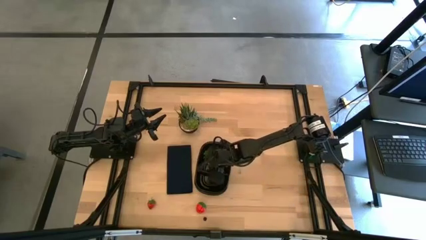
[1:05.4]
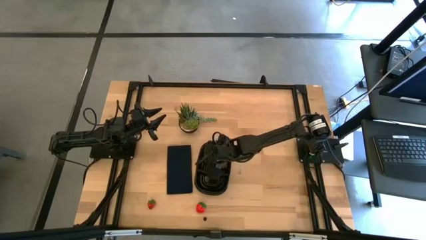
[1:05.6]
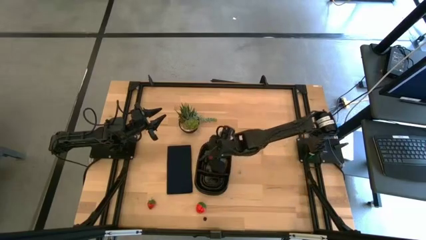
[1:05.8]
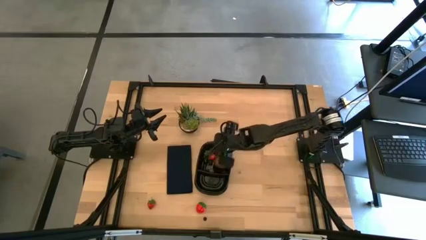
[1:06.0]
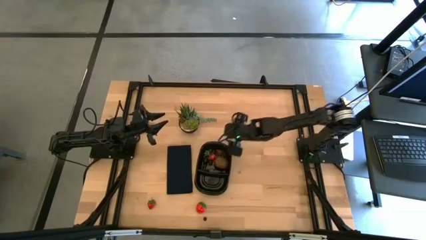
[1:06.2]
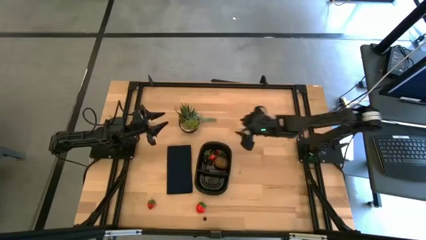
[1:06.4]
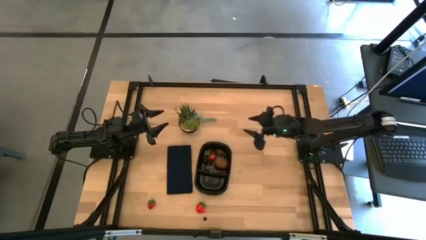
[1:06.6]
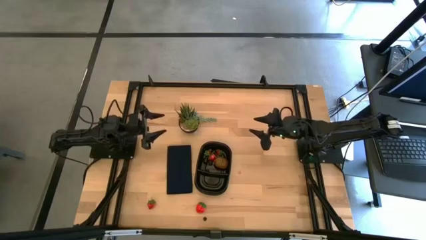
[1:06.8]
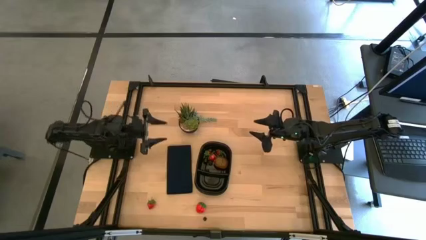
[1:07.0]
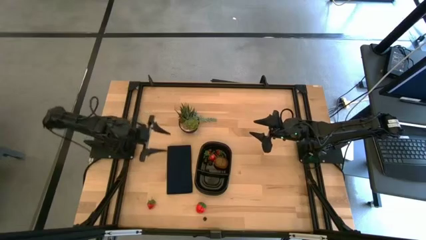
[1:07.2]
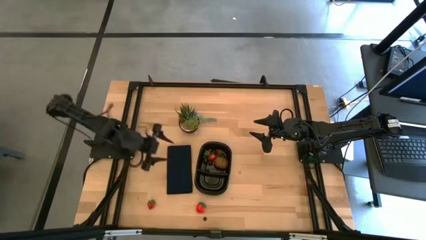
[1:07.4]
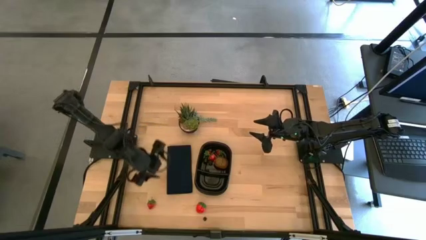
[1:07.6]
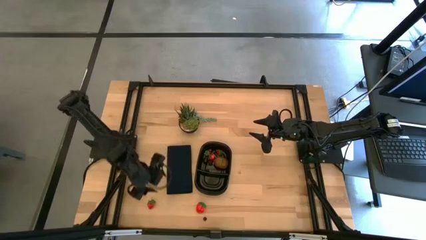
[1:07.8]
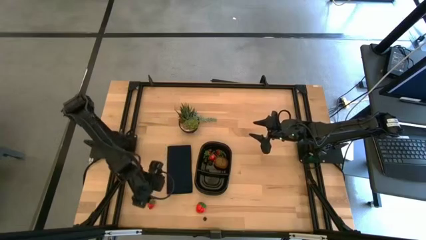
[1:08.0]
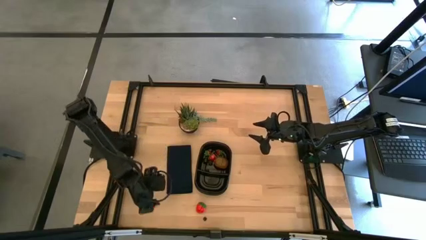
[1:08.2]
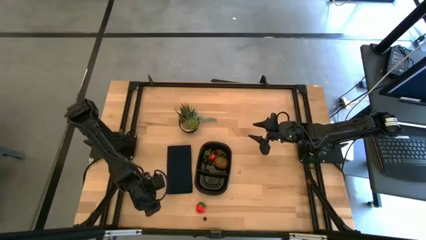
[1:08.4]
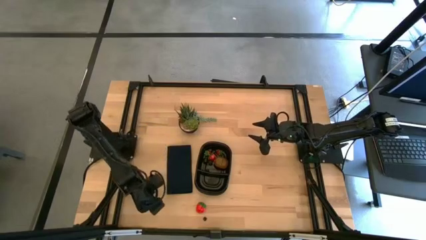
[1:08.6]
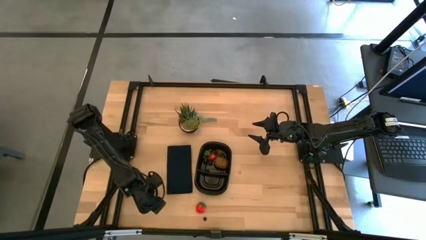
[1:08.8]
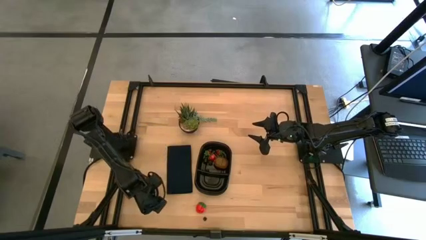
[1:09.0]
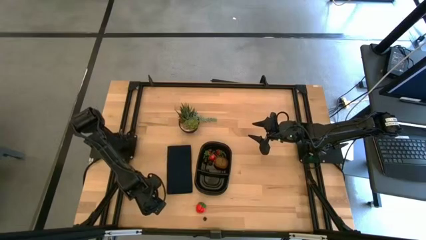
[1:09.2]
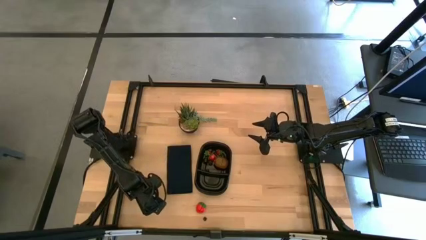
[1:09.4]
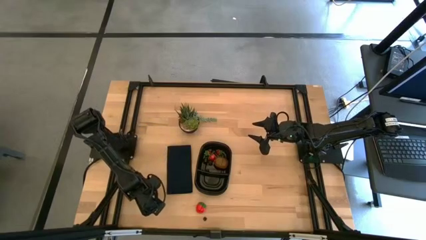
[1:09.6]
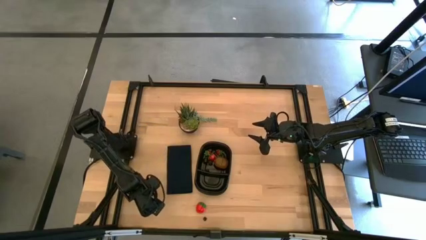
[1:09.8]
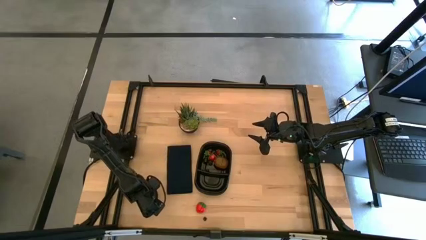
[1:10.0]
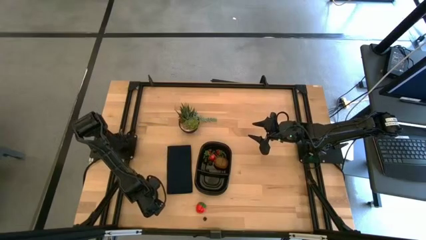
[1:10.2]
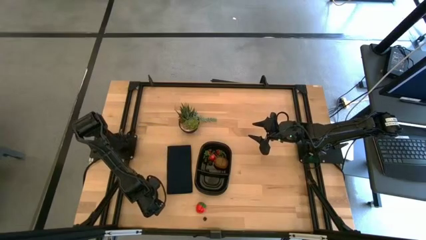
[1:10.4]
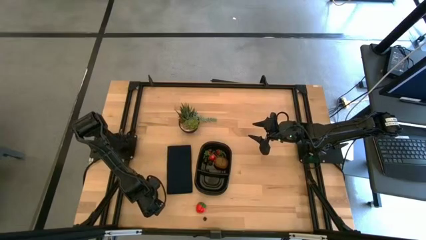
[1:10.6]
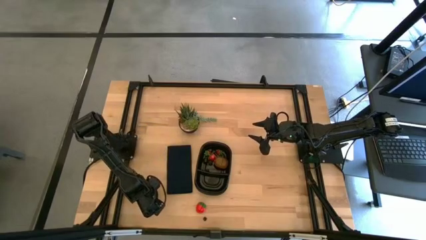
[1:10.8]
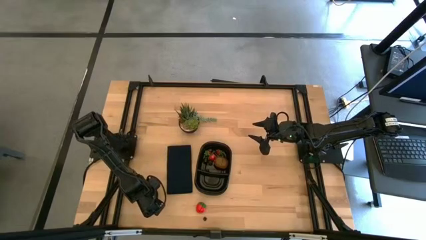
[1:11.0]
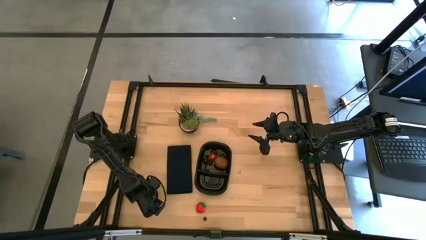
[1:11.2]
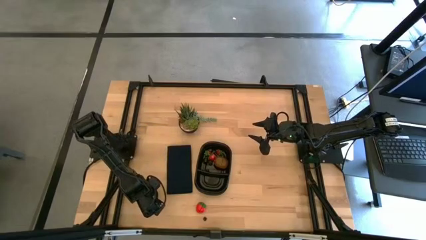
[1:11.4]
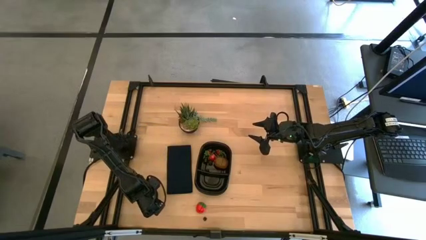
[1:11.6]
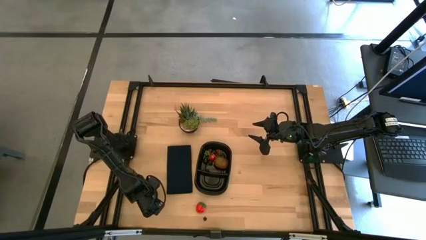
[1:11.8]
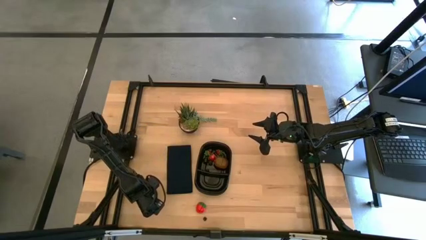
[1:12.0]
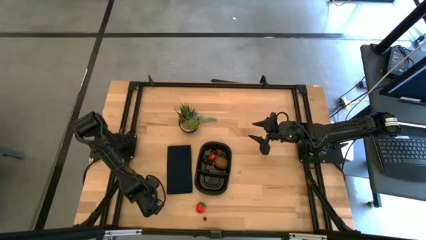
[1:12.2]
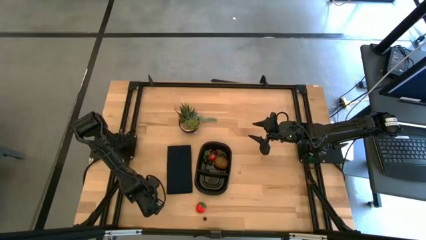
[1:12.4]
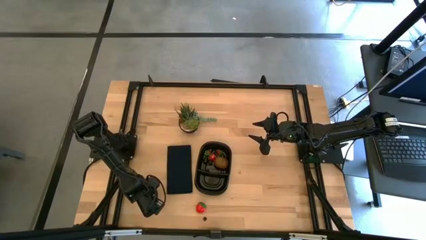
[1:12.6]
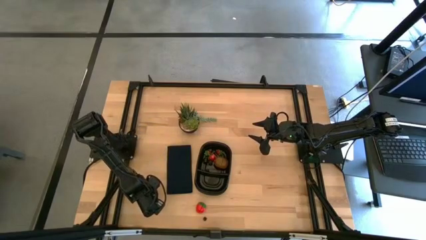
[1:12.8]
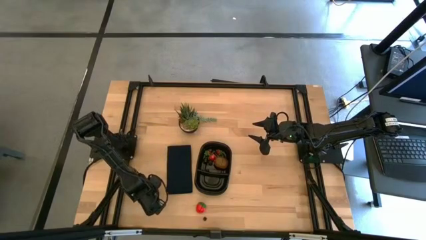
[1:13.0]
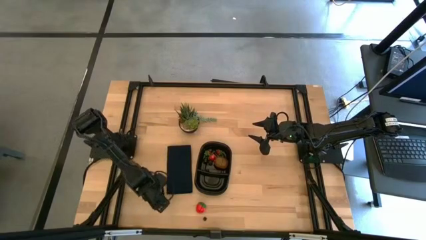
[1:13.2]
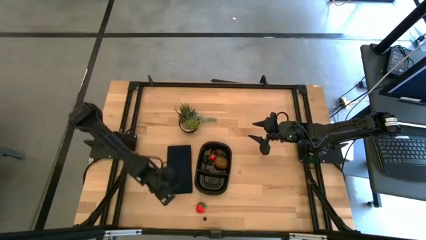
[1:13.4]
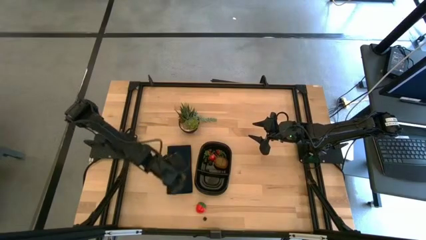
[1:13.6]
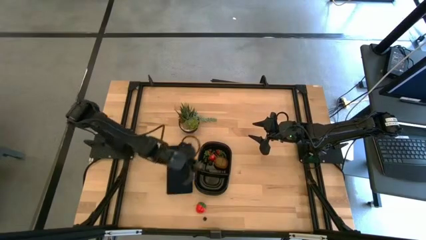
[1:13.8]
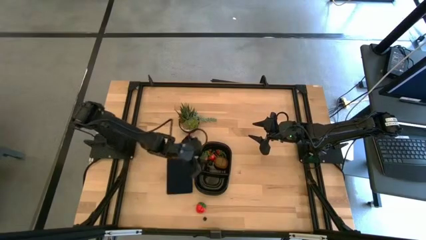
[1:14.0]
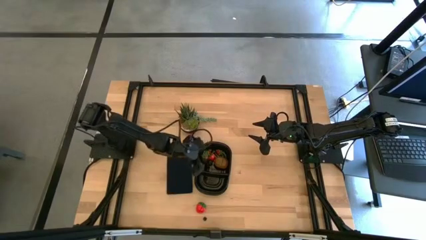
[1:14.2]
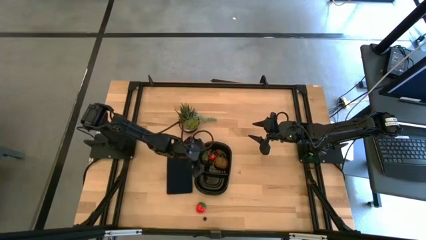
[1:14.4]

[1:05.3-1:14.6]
Task: Pick and placing Produce into tupperware
Put the red strawberry into the black bin

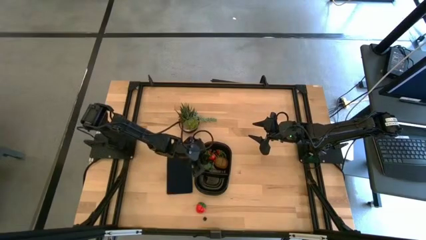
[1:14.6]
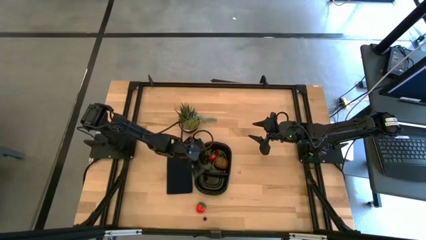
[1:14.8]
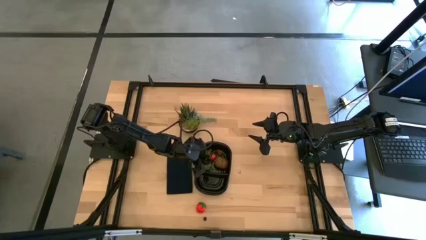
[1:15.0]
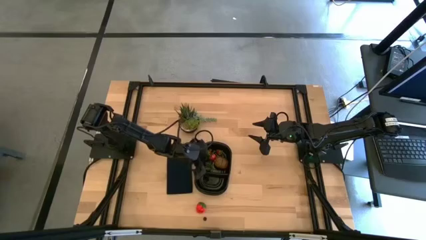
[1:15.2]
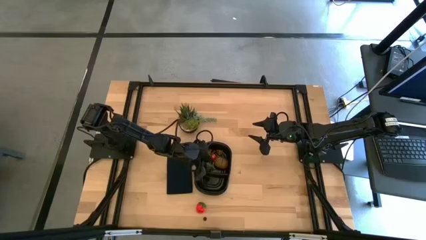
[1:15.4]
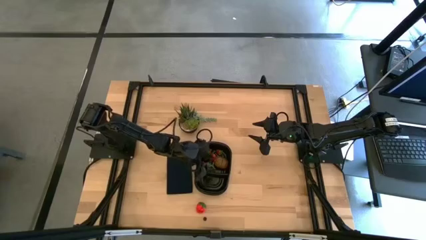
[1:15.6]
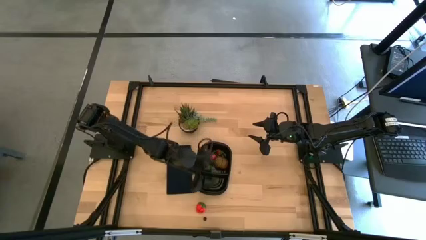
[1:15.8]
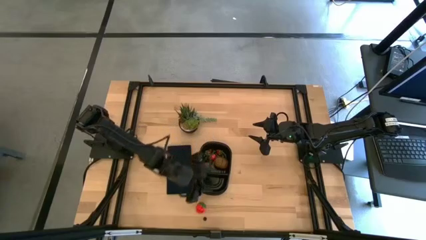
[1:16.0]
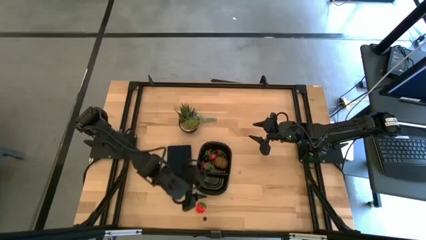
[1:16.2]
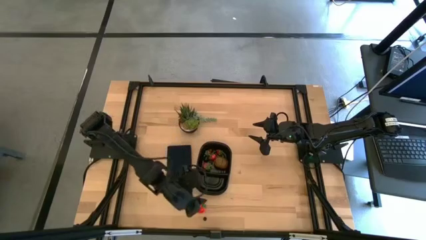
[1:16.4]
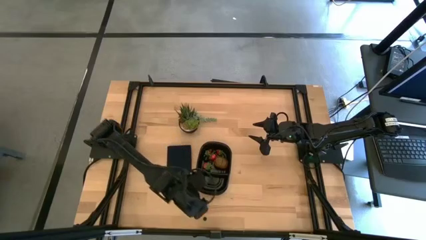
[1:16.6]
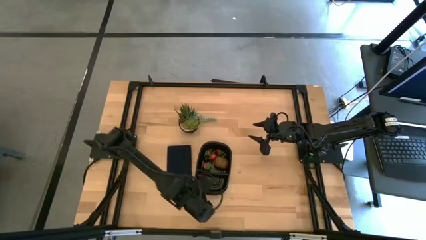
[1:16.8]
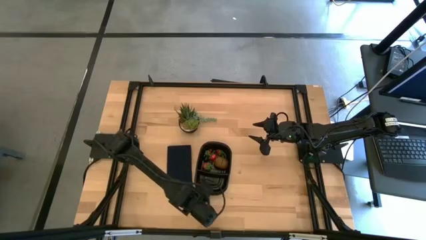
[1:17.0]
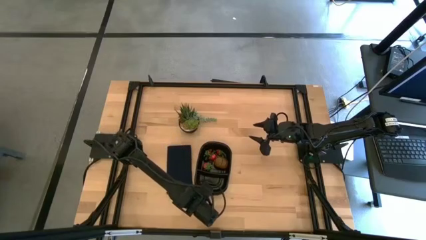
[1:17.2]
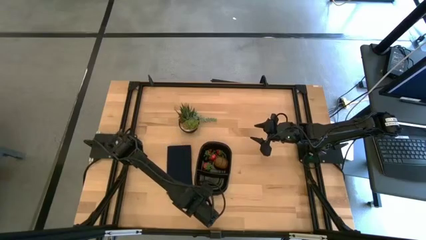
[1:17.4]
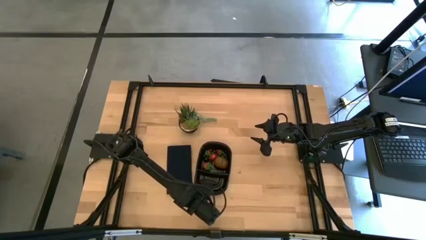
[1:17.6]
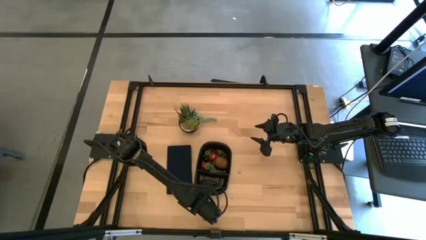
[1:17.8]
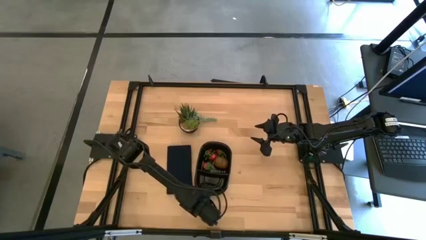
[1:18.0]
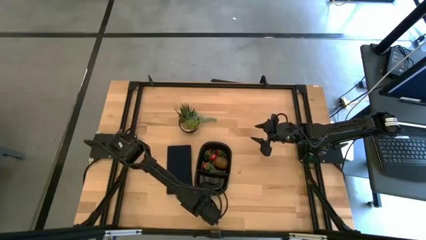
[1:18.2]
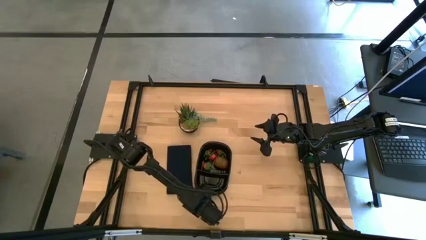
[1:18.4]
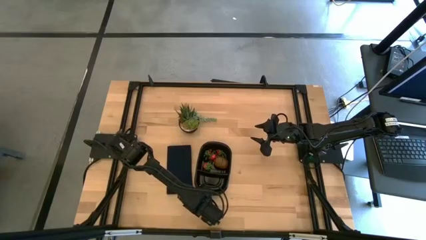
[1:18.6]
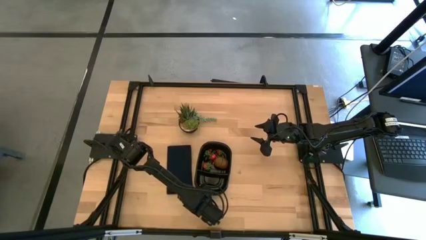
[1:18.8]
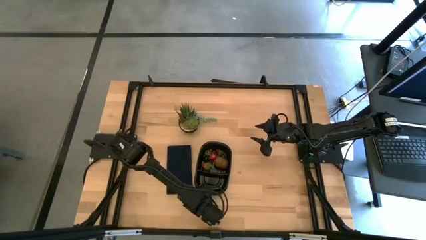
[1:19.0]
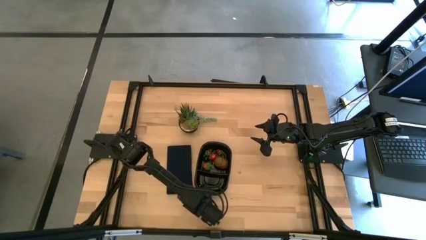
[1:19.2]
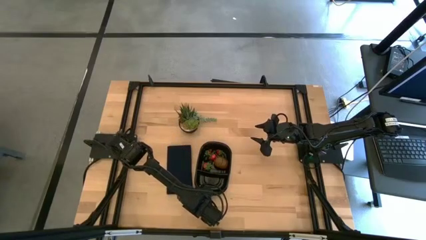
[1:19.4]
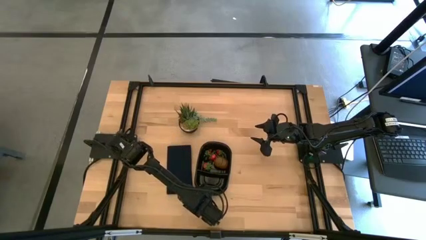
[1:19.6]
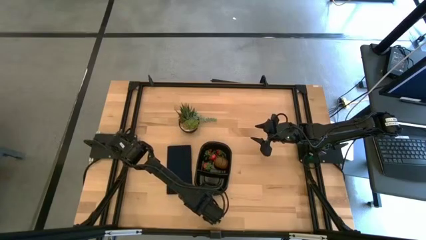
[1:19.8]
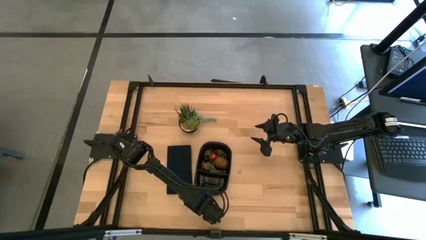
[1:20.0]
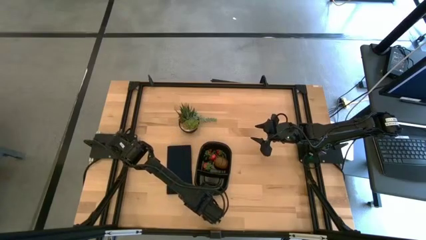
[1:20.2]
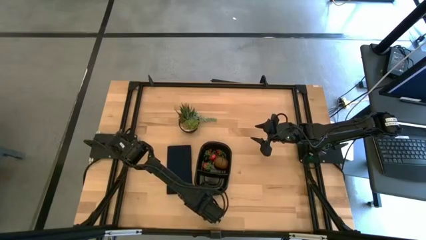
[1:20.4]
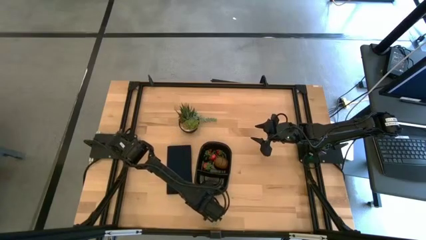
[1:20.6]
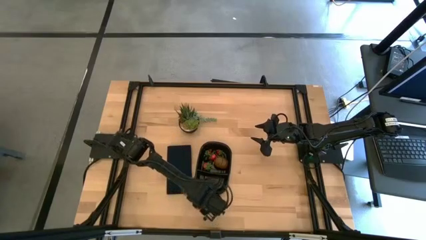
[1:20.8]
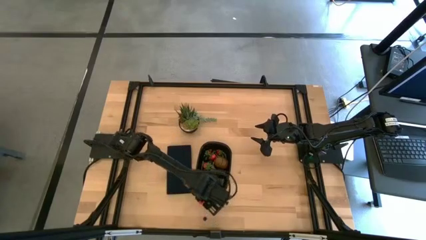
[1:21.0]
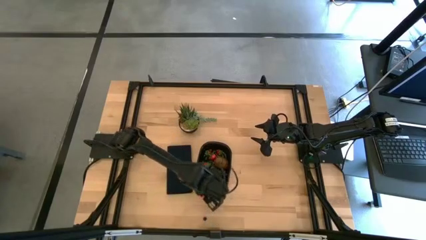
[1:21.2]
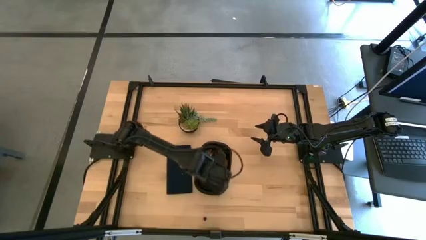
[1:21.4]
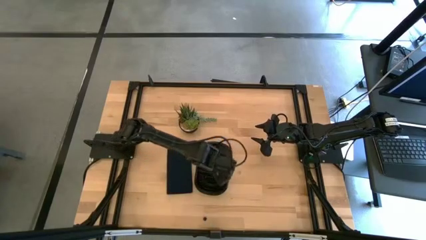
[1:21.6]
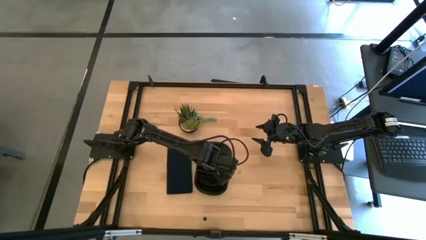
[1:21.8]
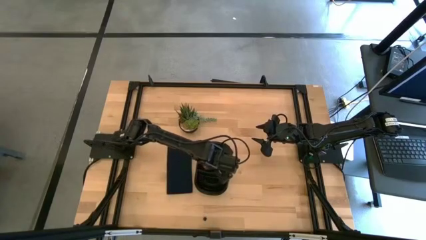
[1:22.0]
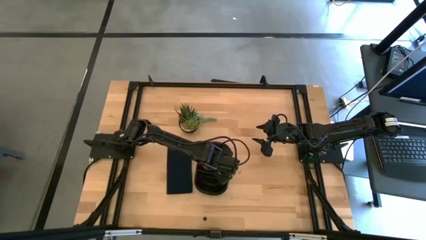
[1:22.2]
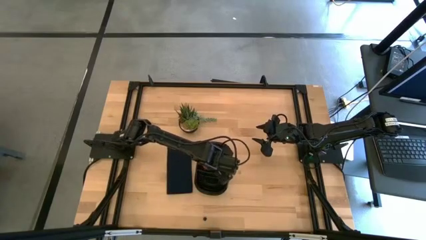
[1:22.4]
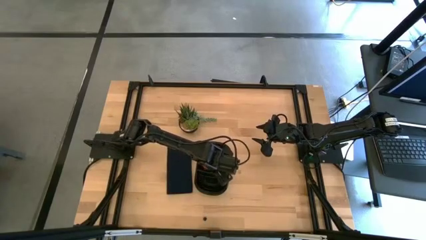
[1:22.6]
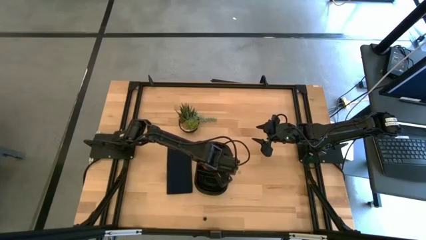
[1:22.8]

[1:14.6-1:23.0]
Put the red strawberry into the black bin
